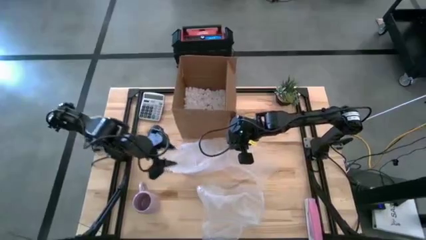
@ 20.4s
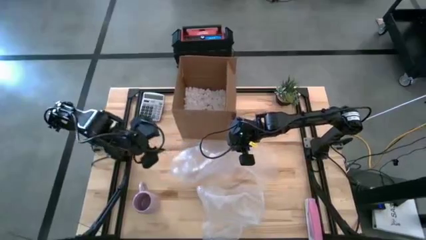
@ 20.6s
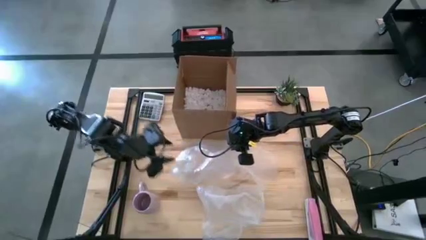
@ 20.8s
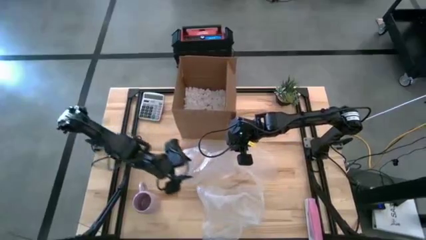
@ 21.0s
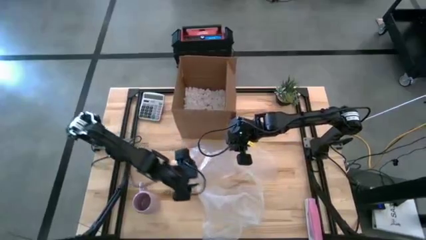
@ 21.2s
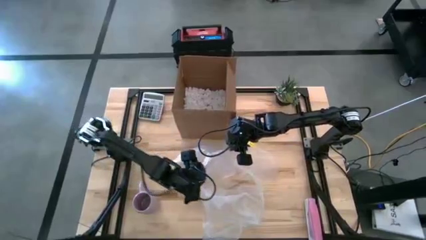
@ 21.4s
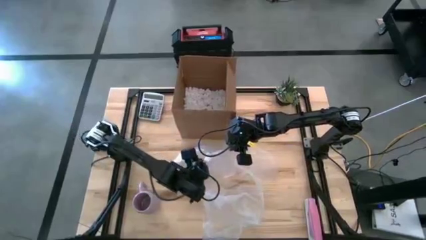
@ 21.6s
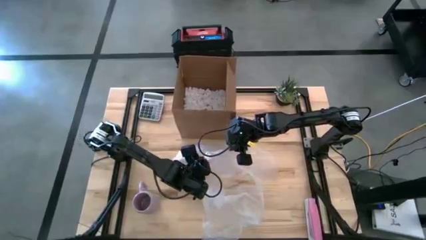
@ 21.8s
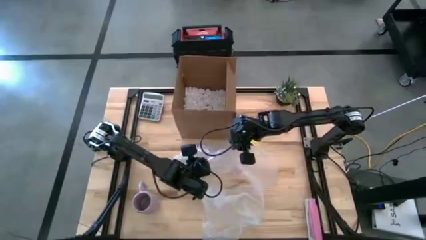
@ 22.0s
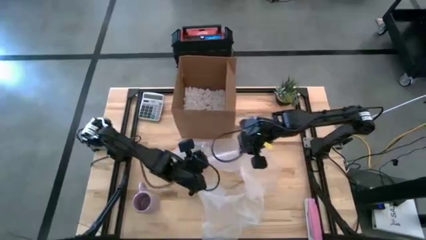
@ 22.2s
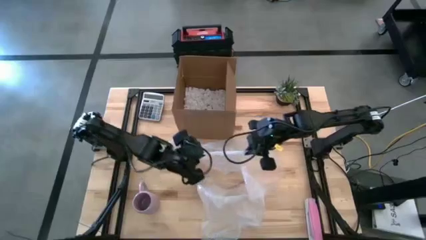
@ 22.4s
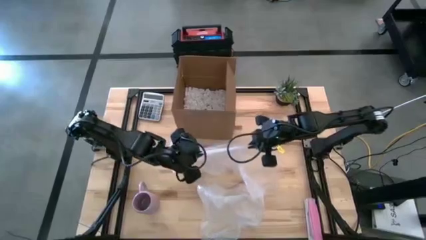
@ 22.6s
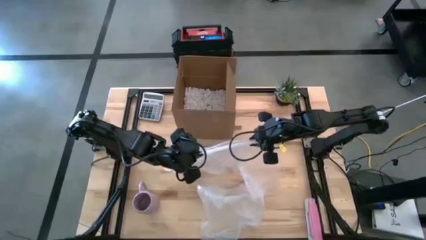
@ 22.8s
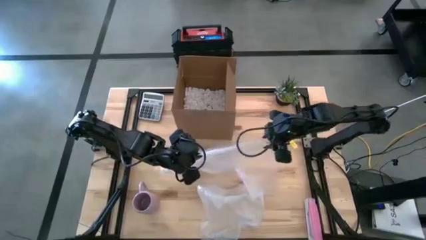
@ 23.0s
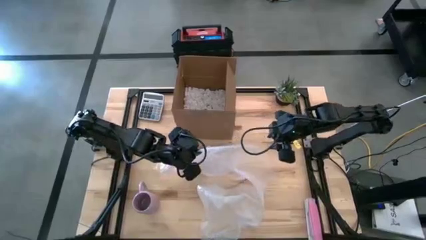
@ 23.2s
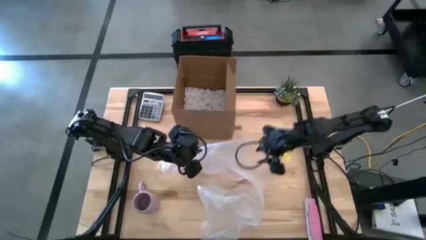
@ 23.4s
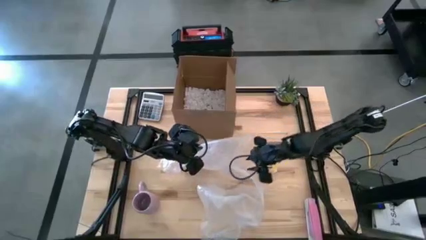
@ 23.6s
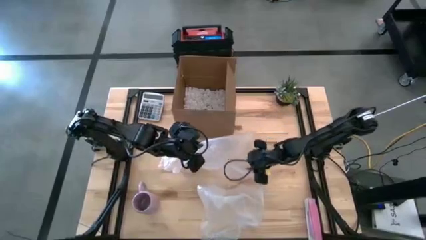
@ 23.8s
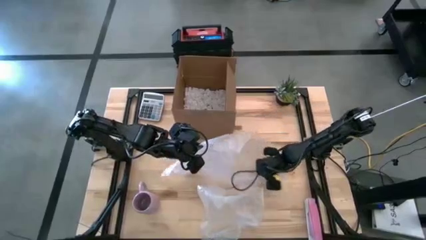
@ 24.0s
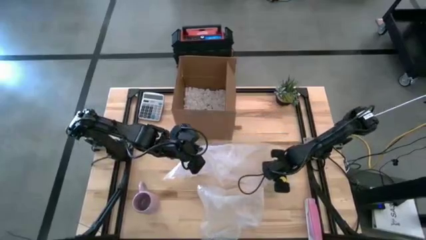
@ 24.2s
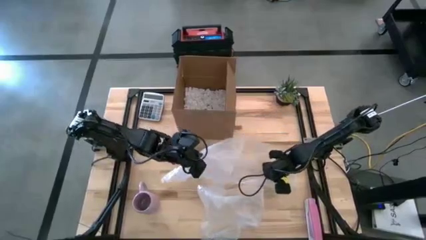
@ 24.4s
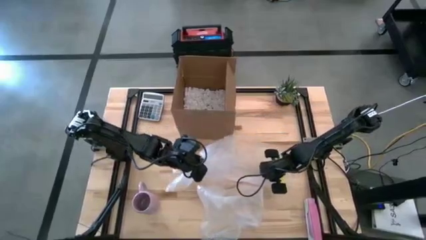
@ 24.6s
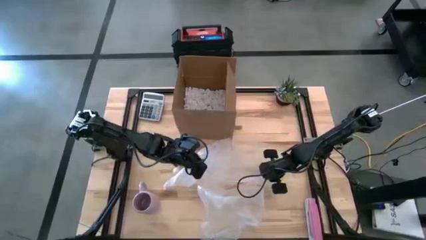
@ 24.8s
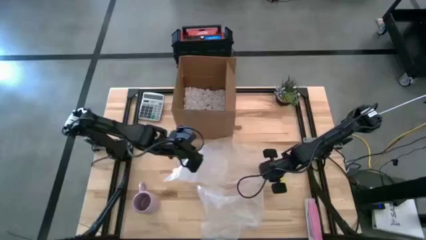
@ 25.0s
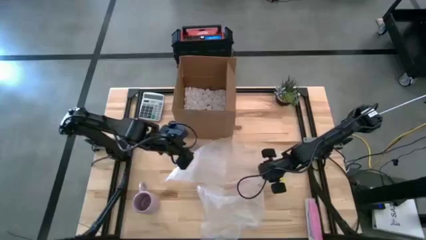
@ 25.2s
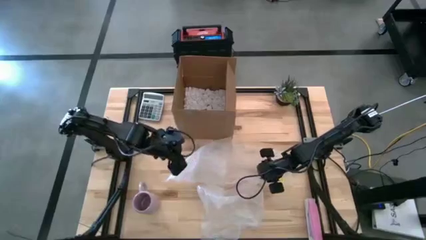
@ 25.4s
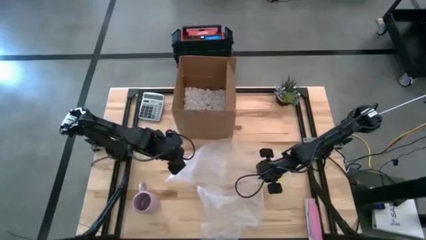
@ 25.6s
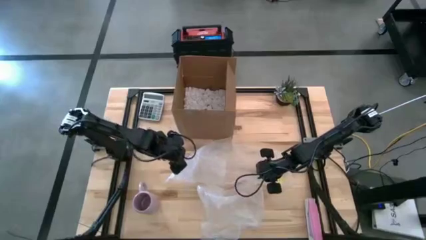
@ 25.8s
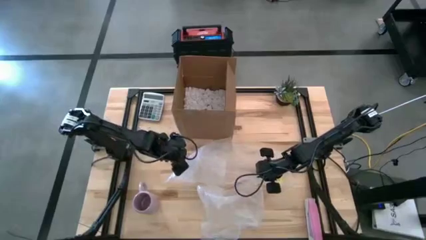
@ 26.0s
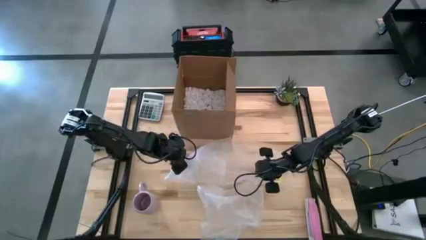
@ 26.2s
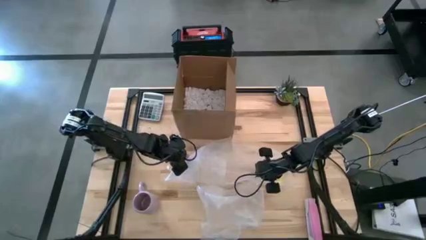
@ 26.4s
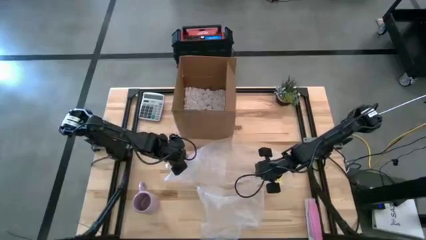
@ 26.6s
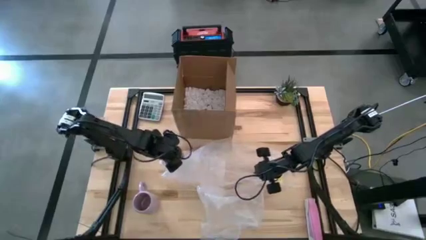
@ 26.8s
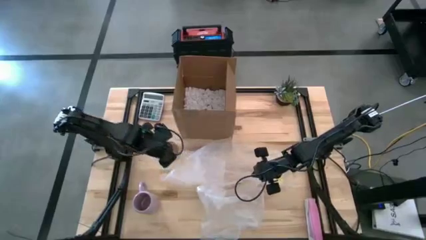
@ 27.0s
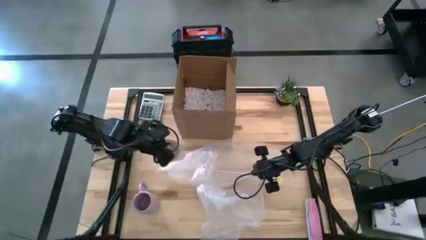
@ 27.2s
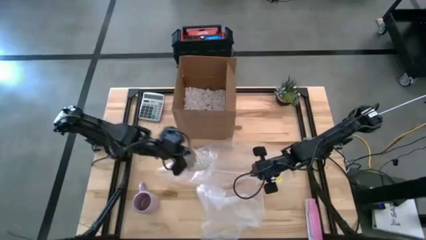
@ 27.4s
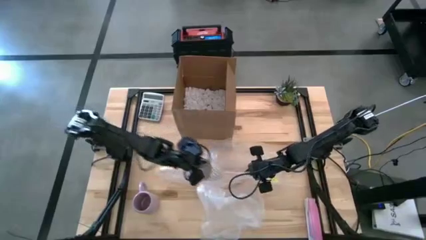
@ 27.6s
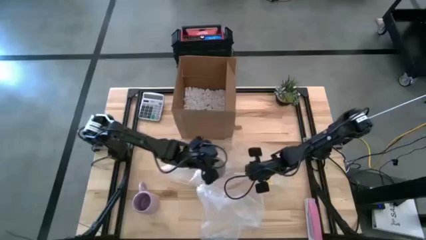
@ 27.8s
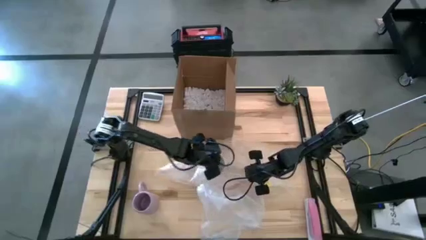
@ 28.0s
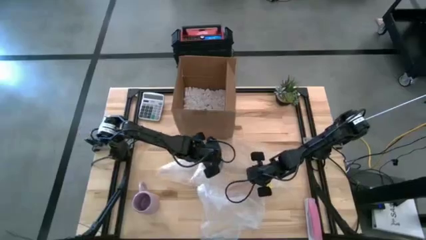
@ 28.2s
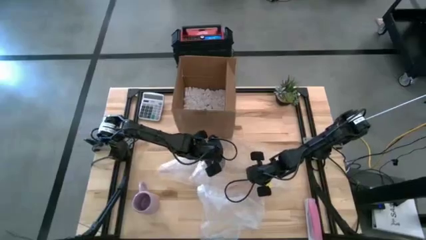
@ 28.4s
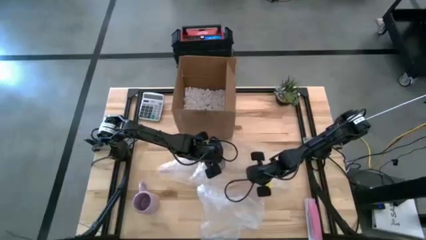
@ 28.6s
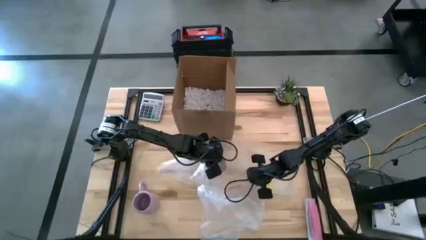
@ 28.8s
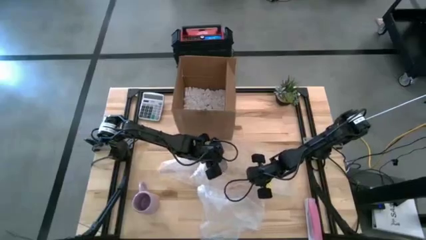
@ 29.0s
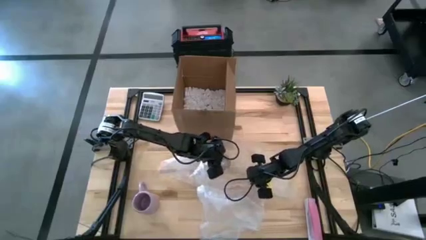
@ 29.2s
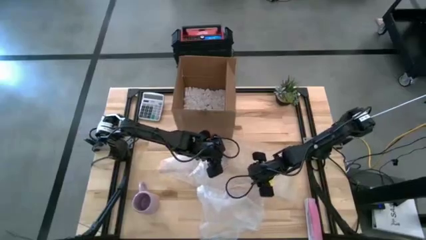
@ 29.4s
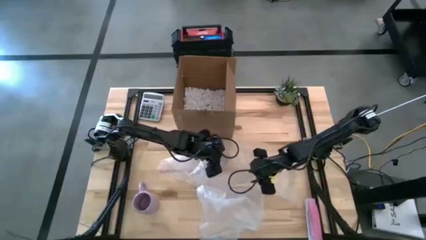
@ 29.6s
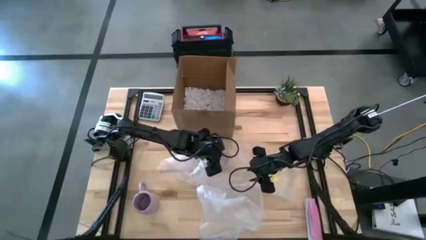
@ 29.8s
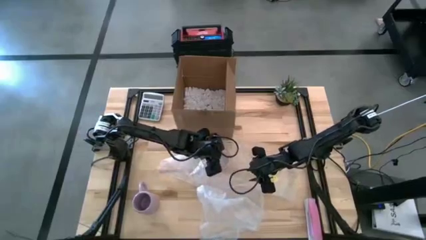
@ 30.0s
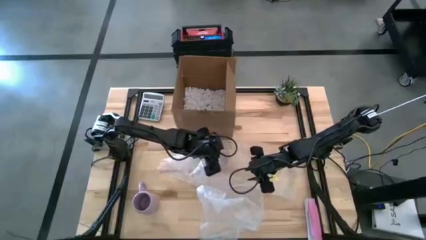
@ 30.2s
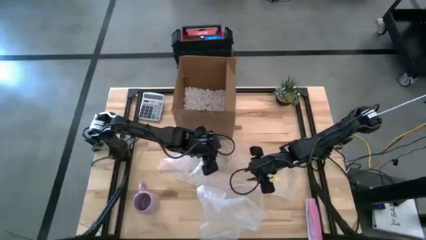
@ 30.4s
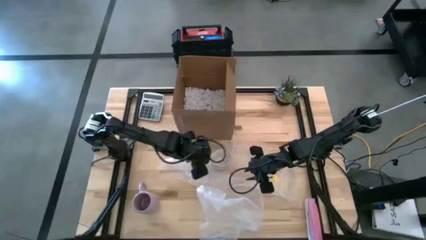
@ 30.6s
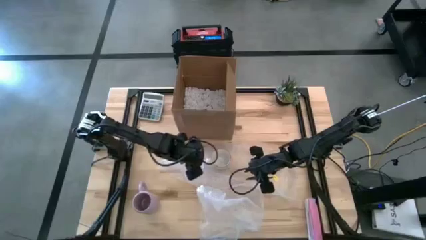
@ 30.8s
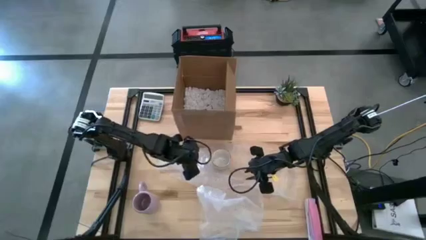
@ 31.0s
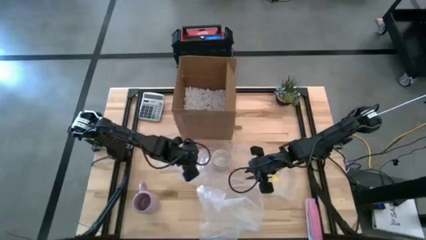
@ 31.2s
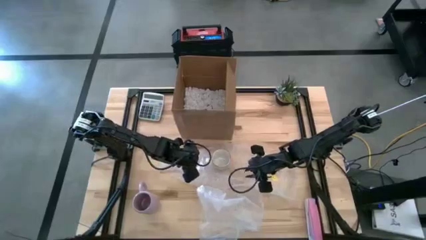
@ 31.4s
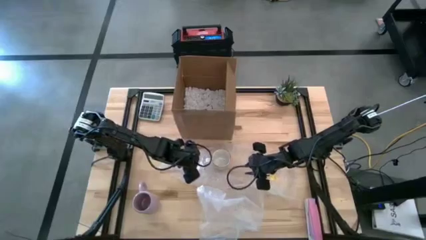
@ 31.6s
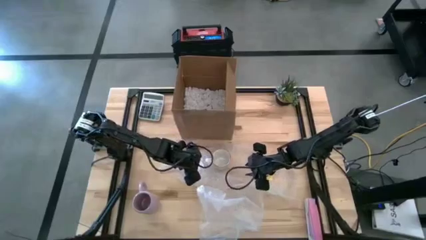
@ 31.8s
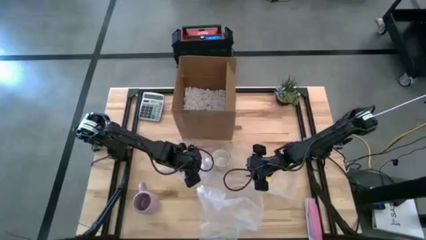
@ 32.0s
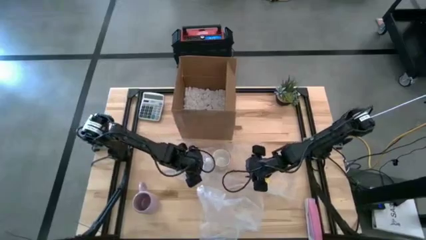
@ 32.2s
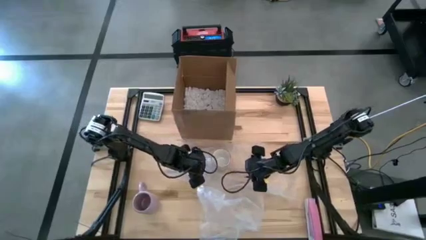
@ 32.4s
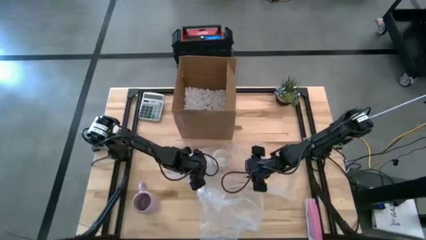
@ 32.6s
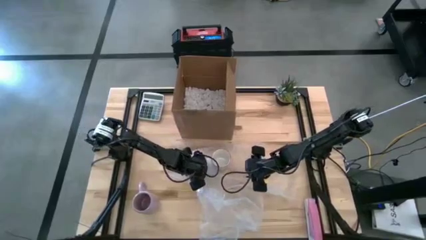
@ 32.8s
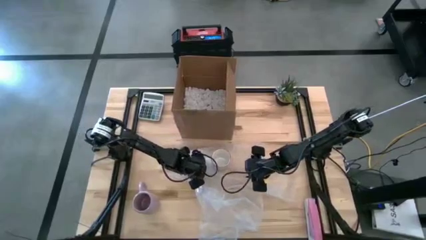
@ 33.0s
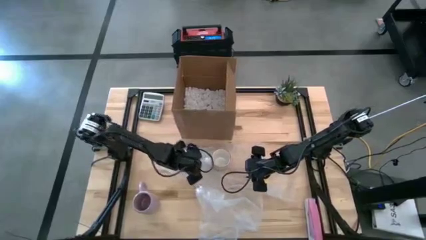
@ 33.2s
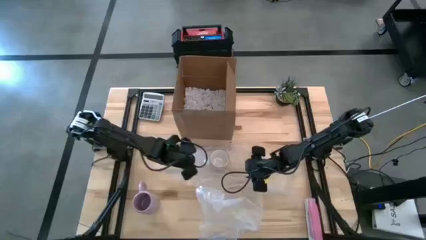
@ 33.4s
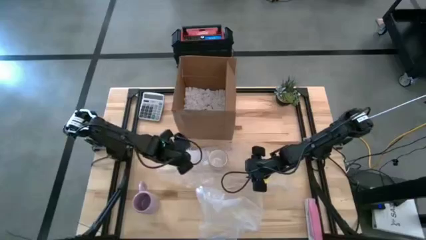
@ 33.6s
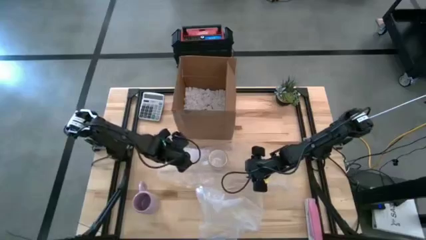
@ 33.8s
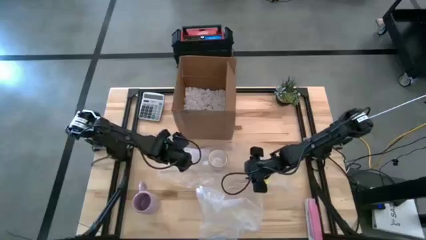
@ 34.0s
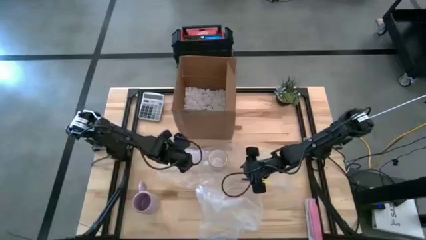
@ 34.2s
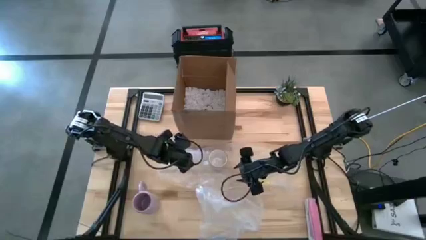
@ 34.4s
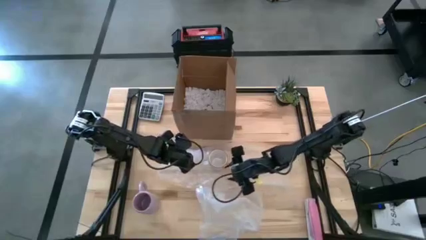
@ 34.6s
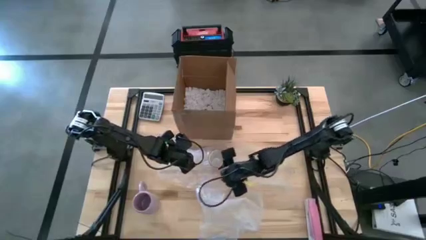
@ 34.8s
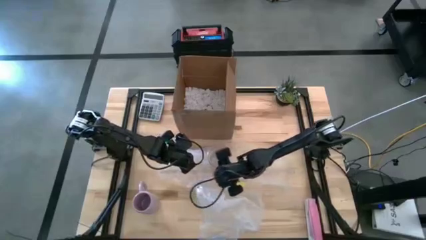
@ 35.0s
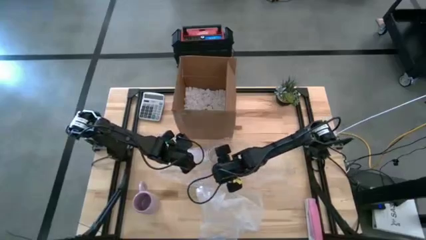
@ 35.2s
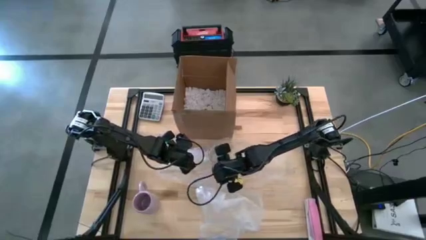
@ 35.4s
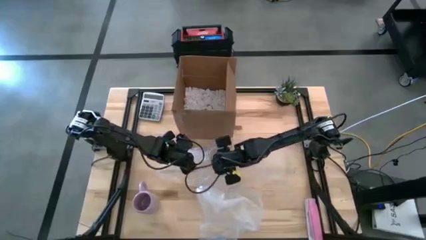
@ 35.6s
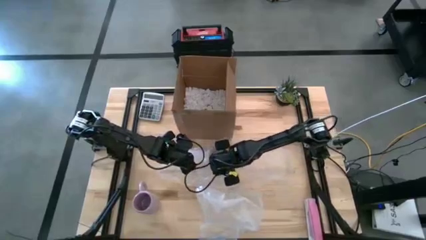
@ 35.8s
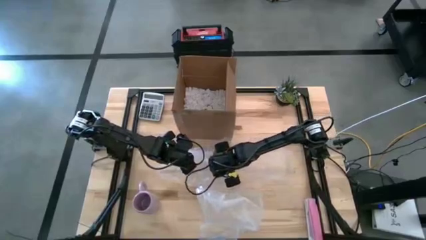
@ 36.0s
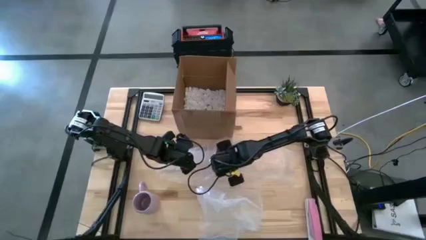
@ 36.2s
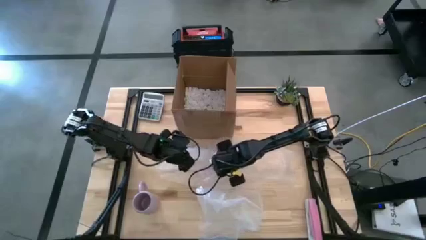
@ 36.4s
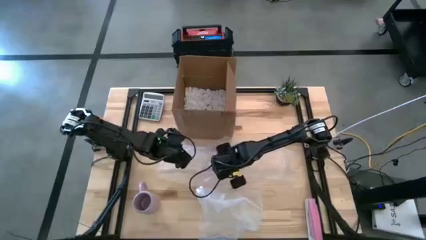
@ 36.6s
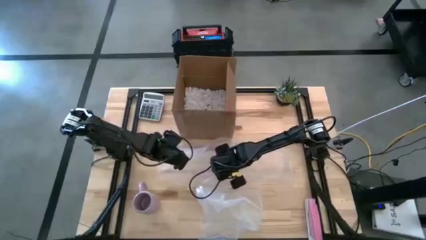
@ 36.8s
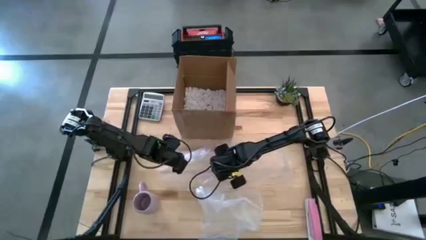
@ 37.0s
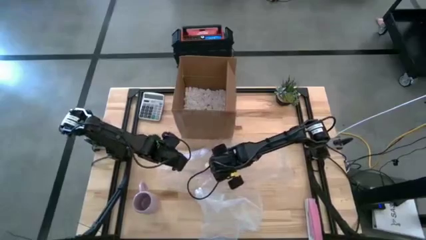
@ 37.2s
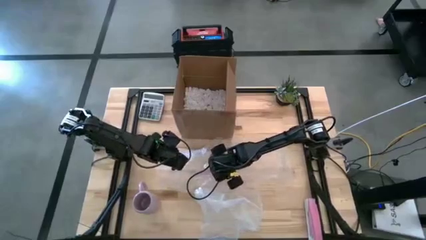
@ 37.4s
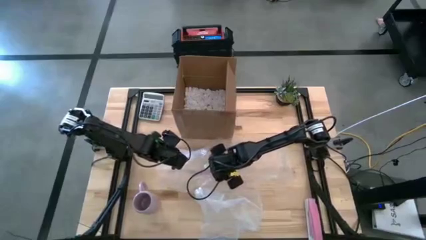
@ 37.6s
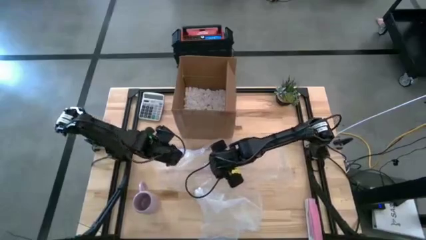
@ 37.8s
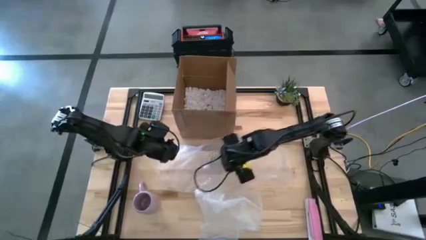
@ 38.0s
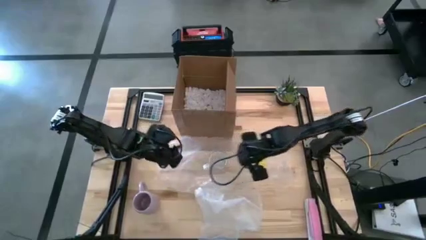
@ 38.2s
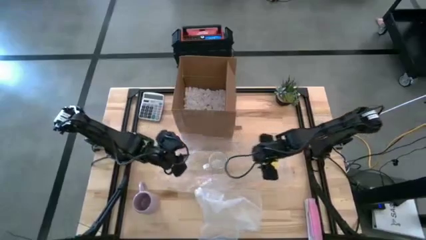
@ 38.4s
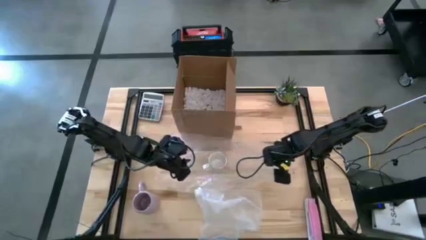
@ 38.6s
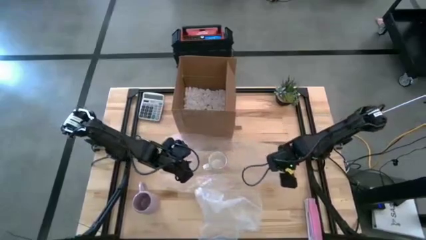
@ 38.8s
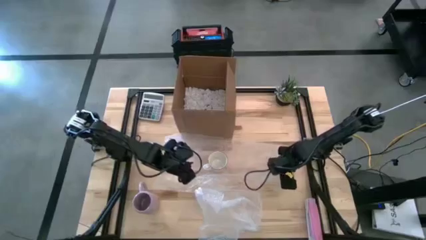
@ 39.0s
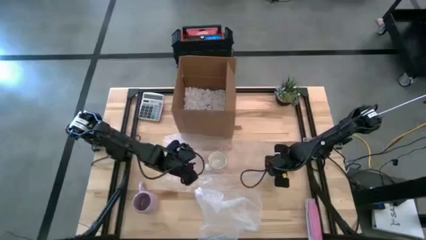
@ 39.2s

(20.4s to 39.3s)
Task: wrap mug
Wrap the white mug with the bubble wrap
